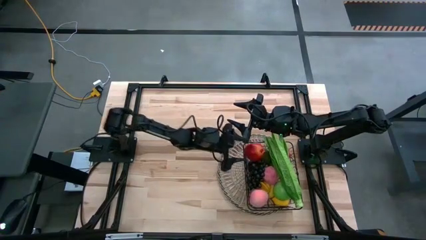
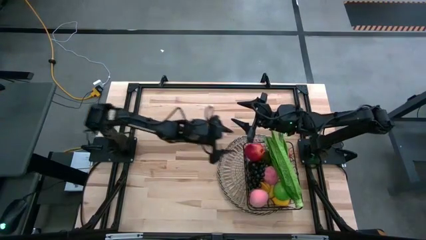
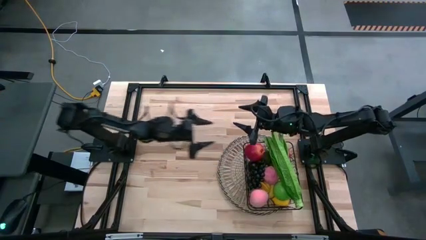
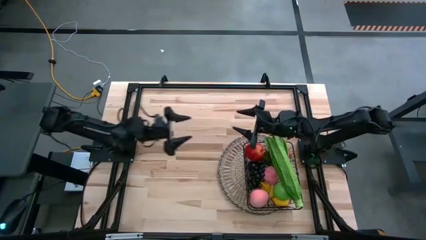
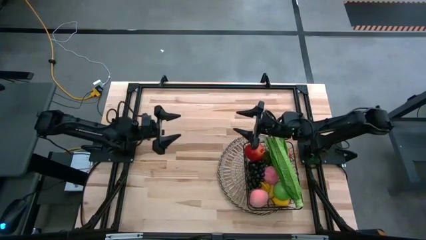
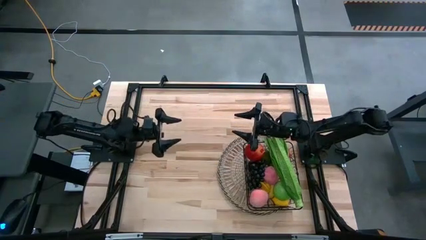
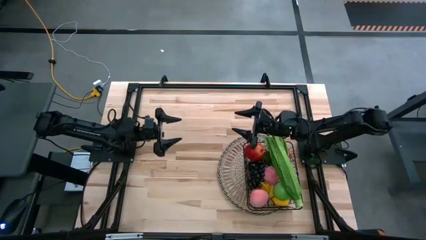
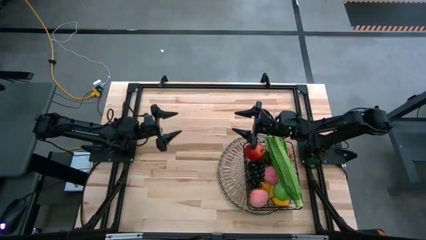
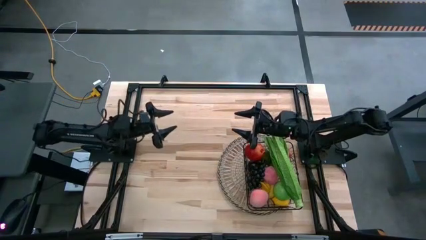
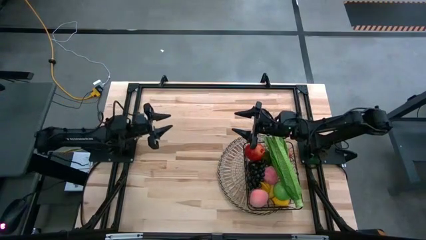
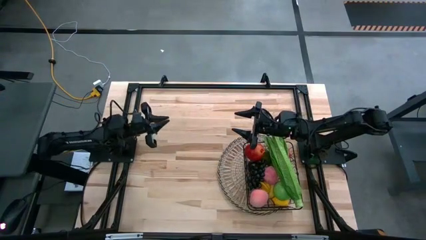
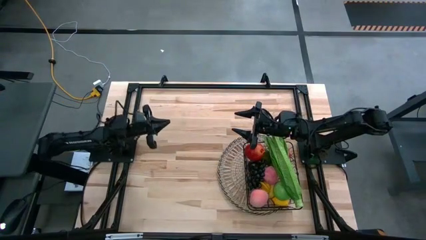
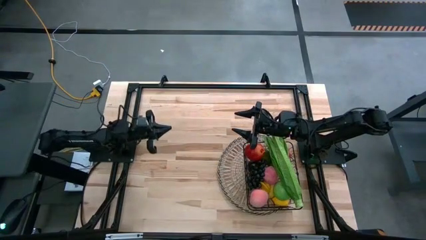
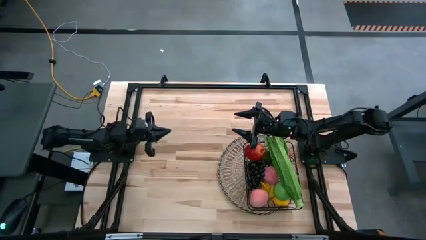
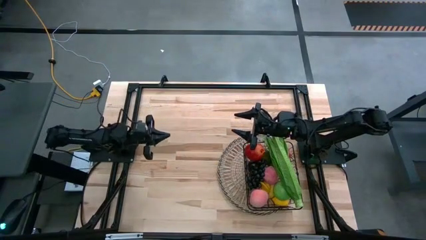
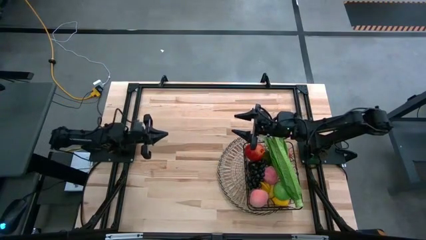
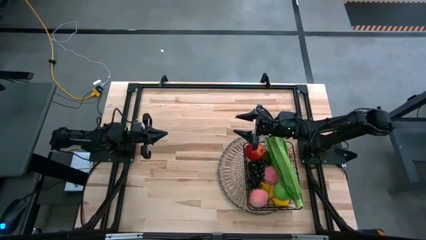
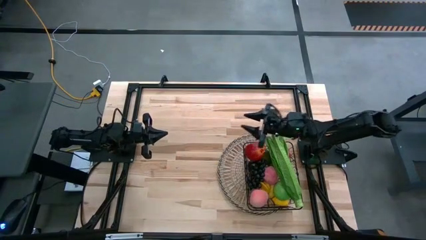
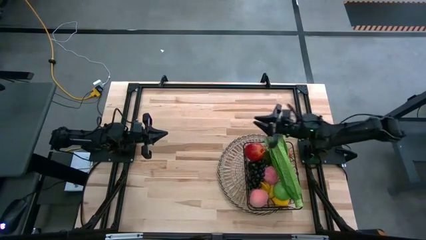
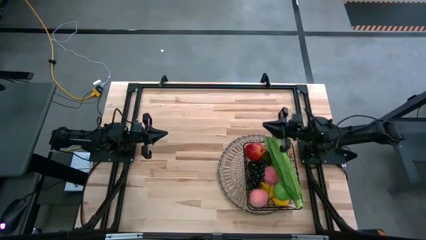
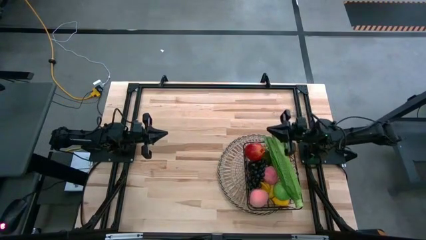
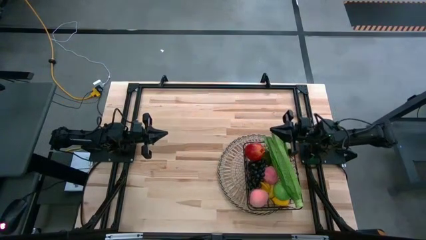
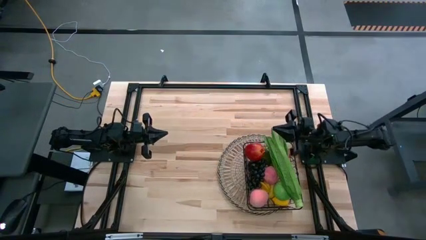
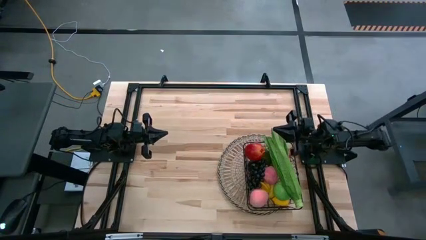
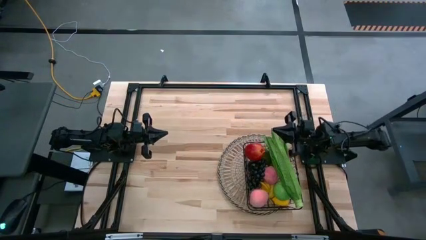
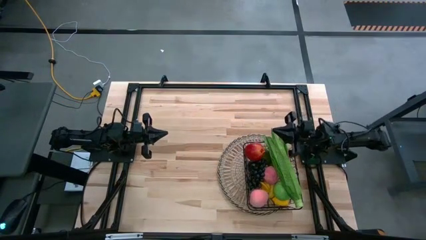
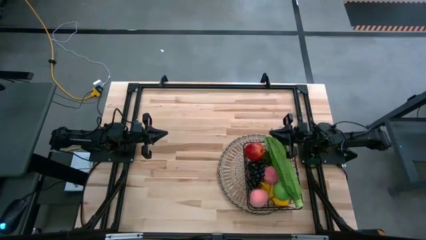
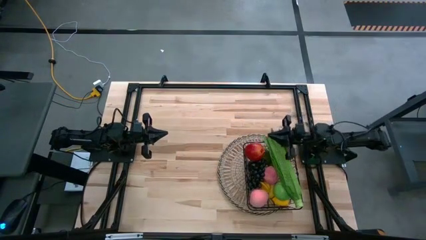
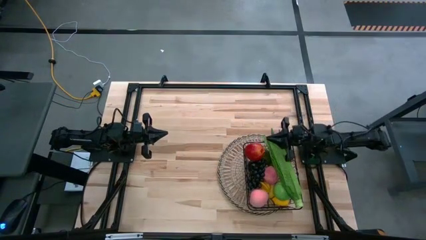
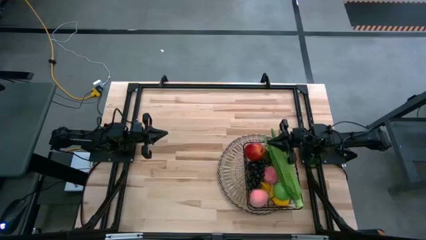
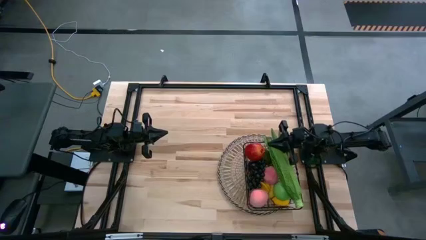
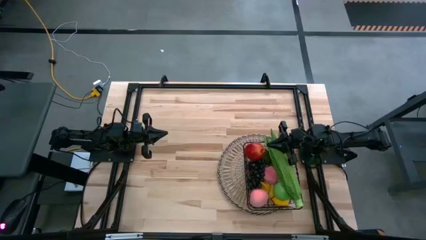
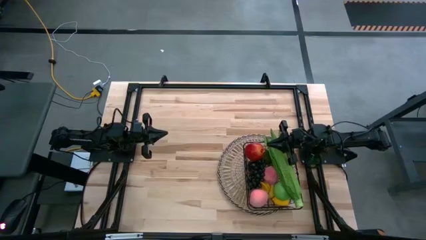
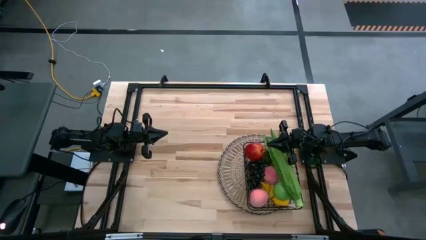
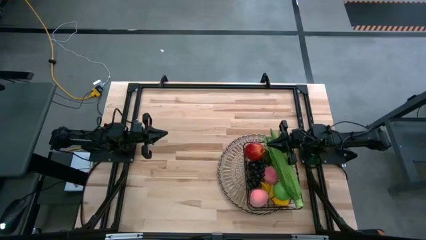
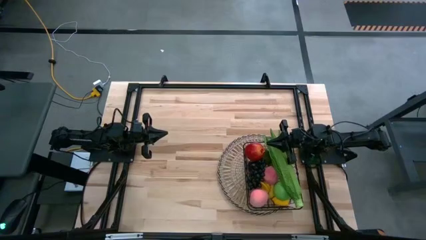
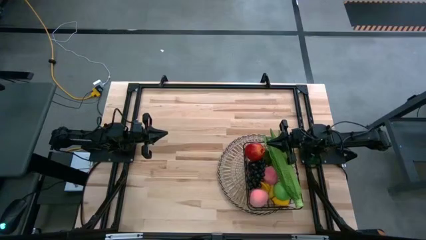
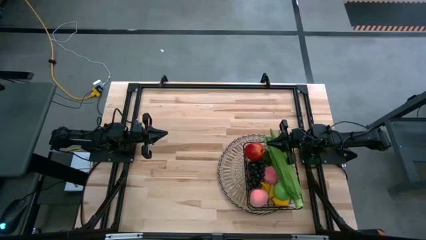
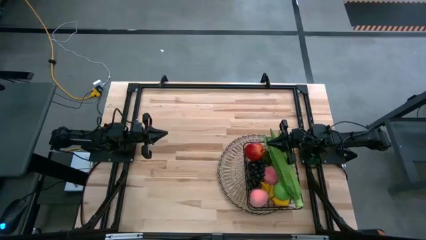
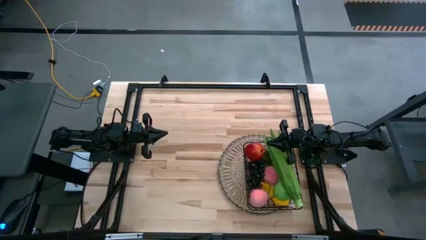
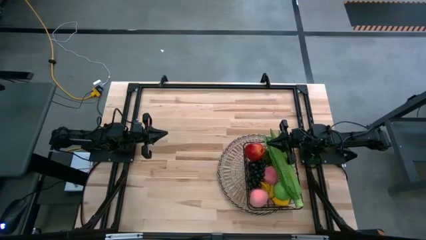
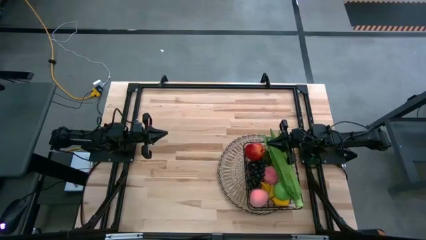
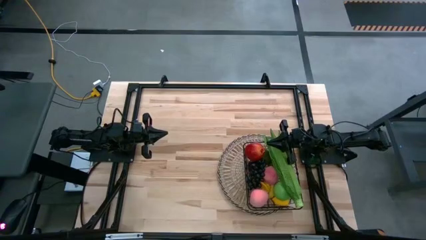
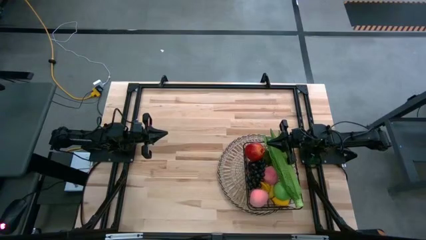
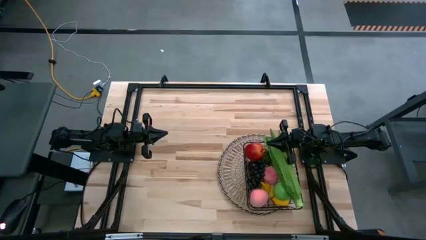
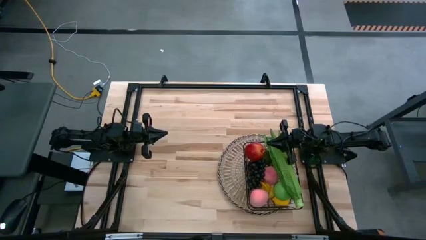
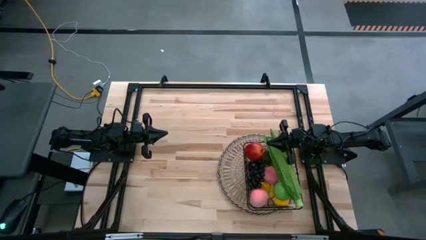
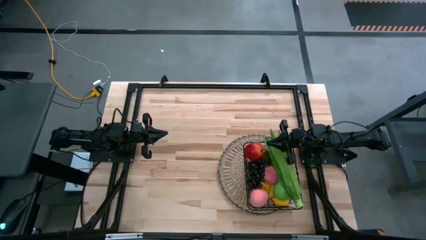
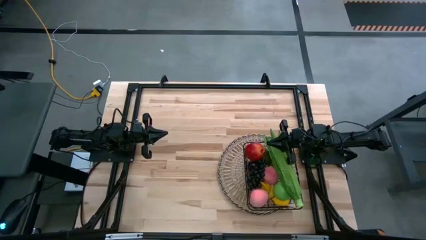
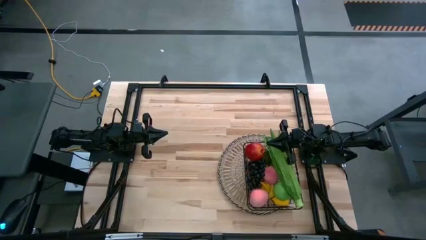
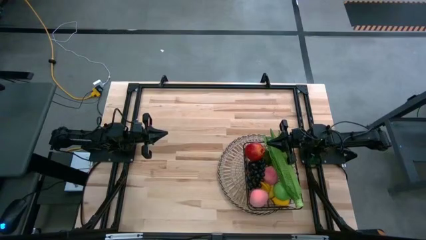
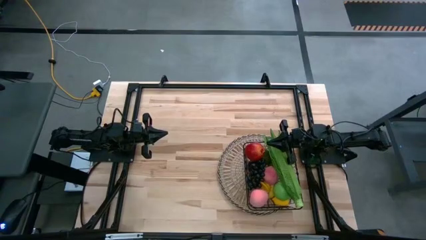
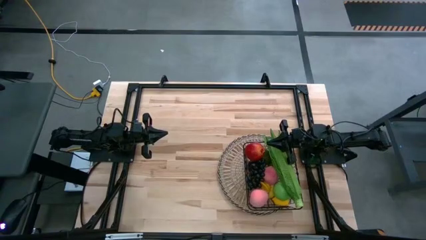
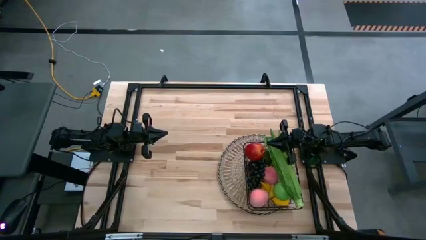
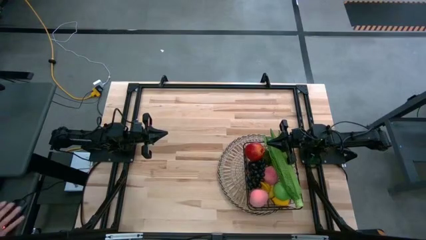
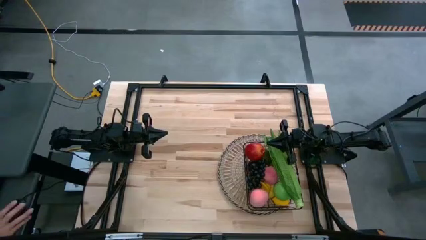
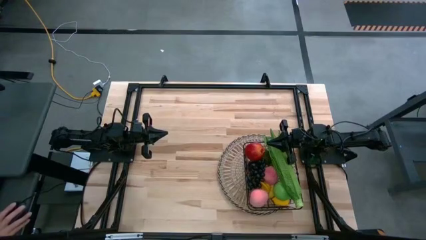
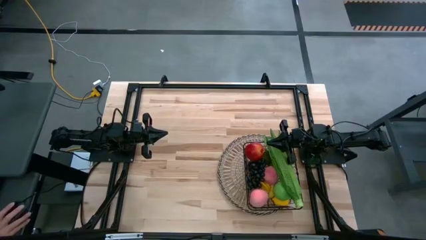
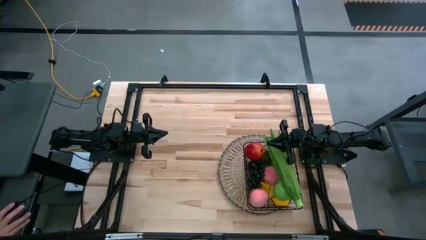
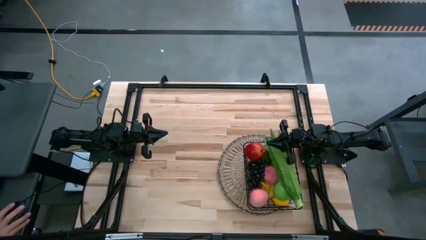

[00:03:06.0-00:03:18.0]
Task: Build produce basket
Return to Home Position

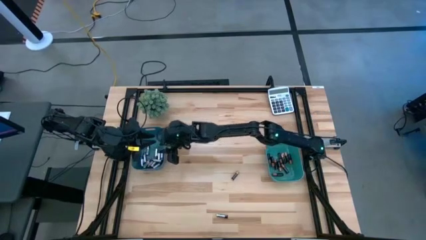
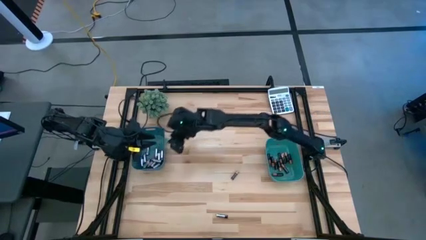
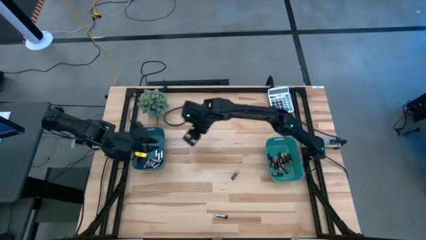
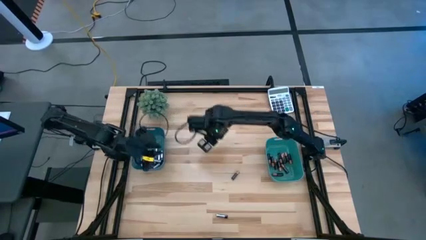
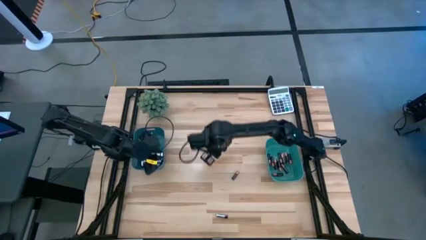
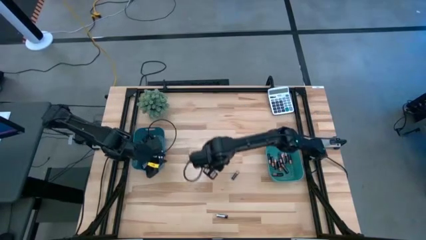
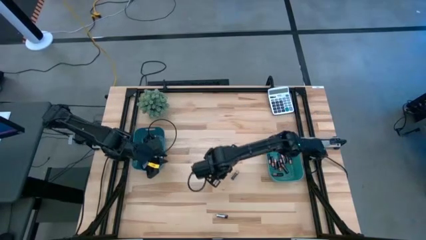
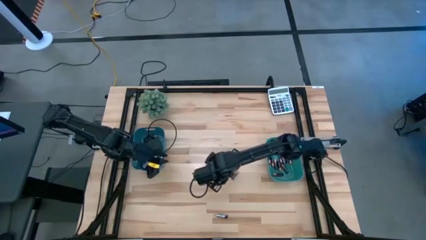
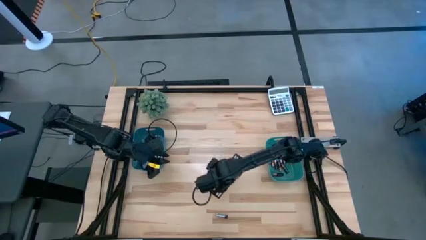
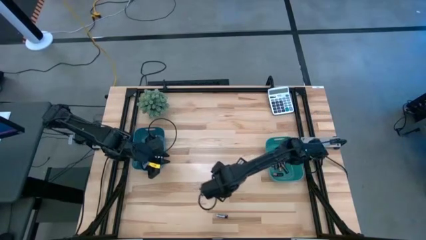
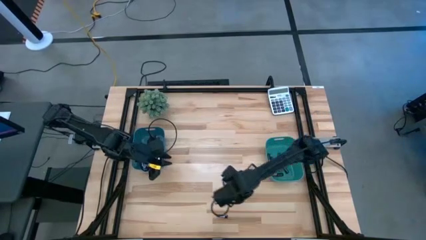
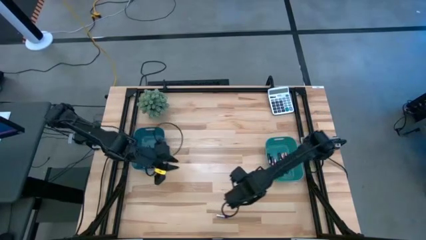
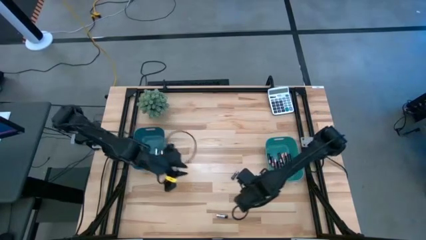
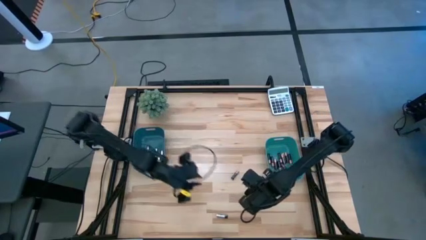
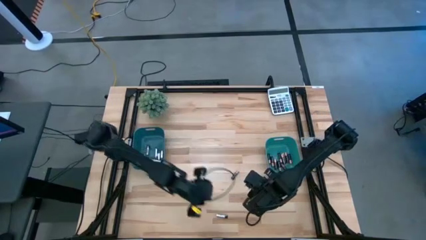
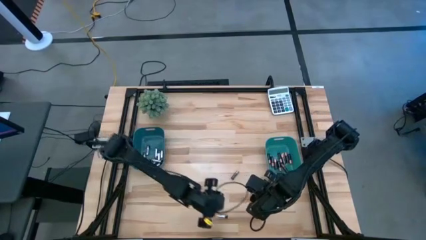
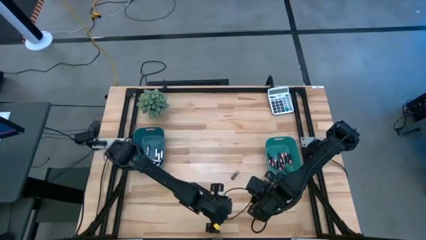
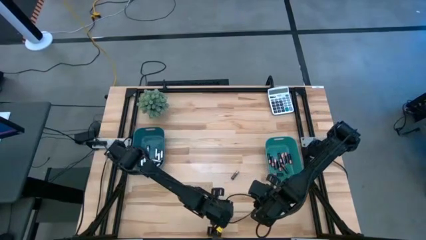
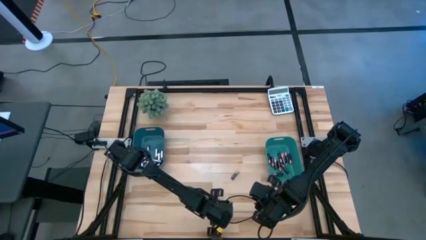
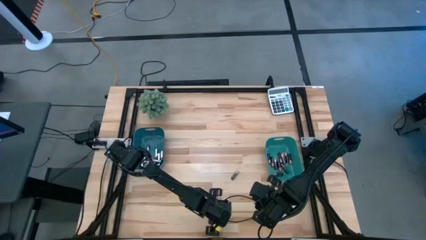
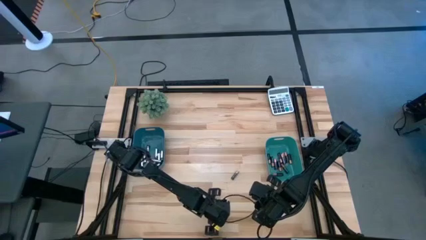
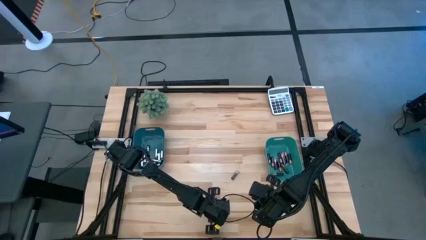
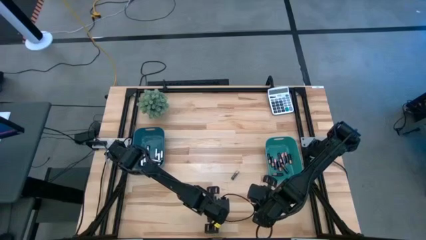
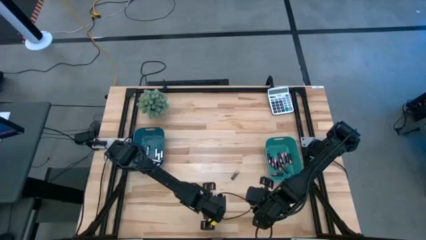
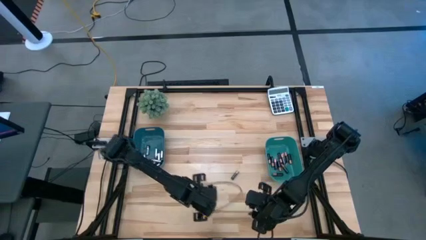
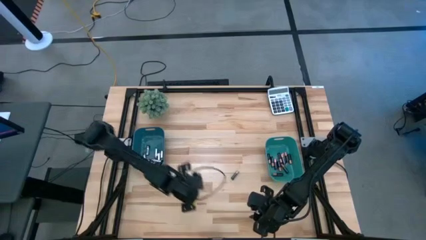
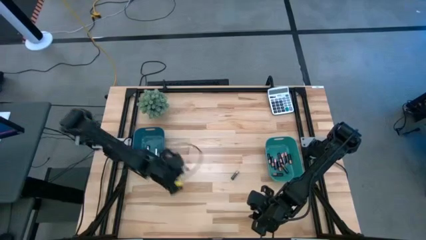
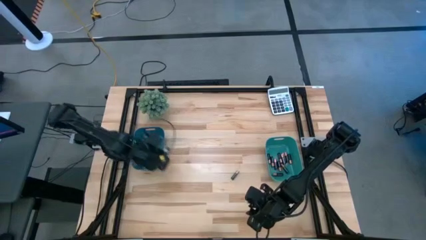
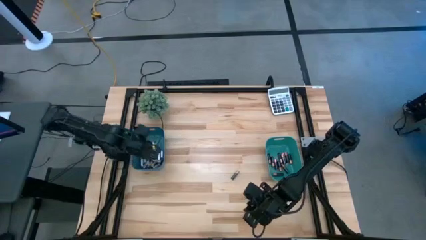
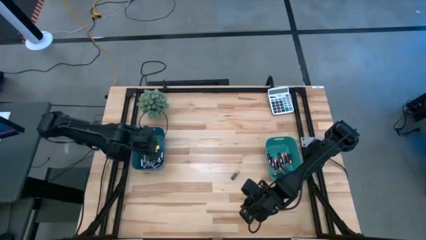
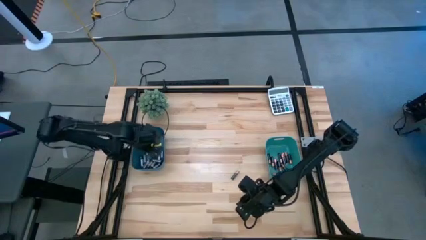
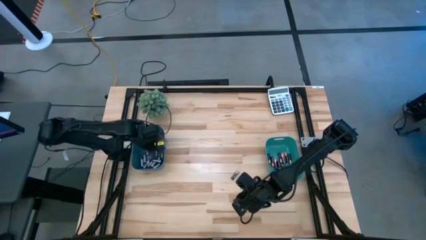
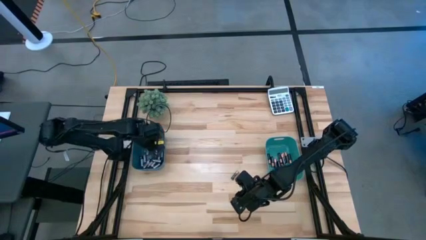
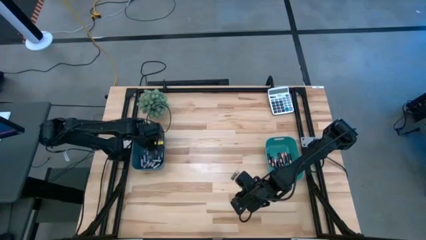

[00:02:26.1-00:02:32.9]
Task: Sort batteries
Put the silver battery into the blue bin
